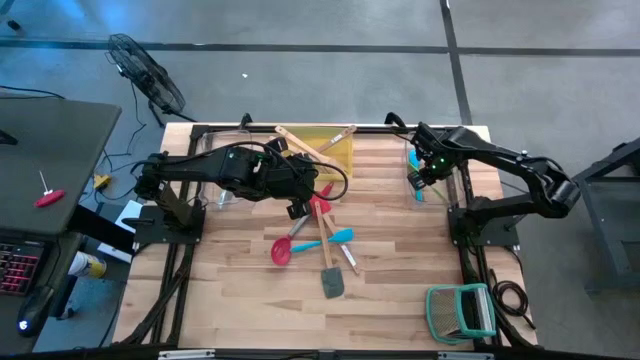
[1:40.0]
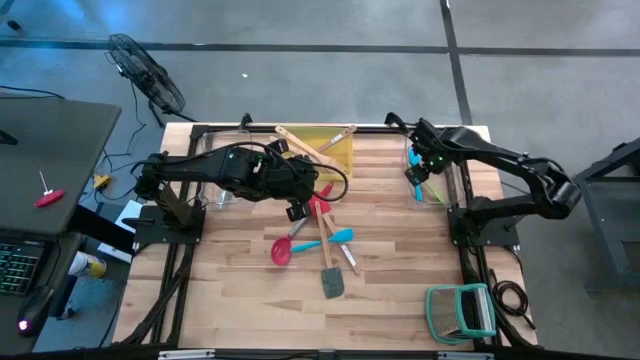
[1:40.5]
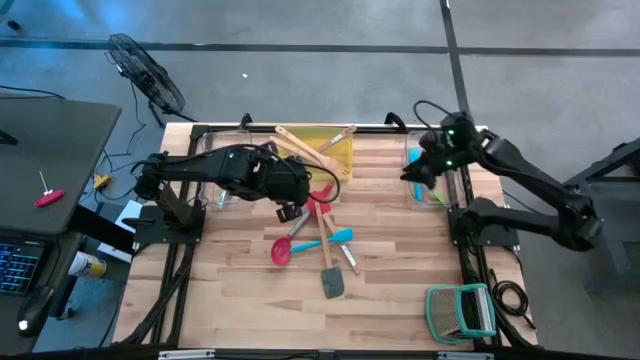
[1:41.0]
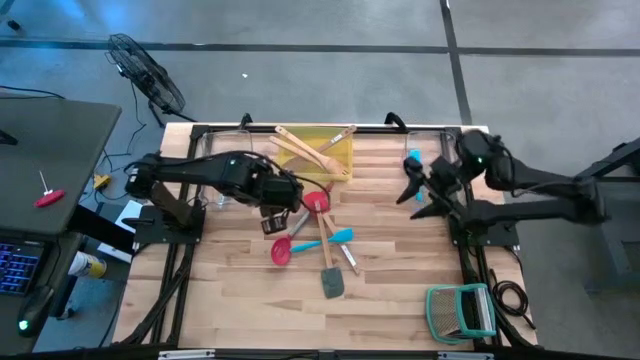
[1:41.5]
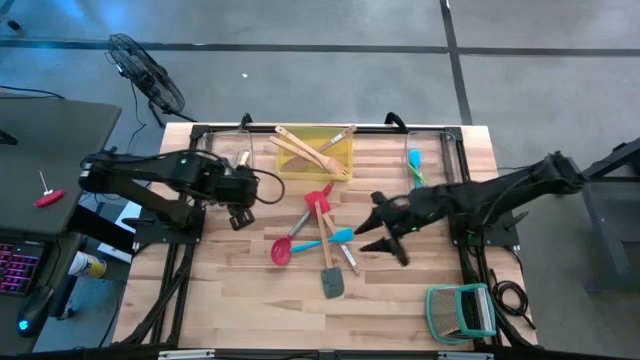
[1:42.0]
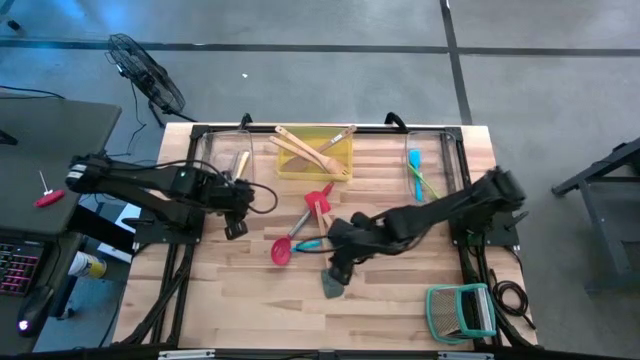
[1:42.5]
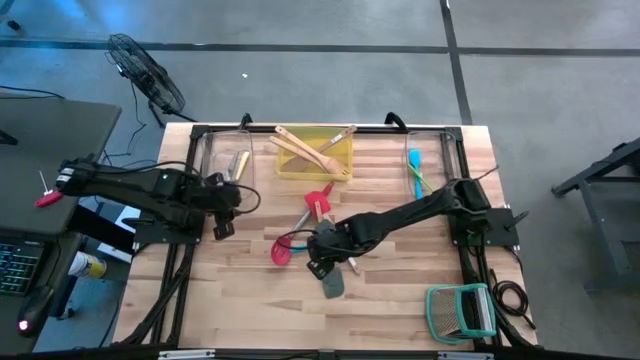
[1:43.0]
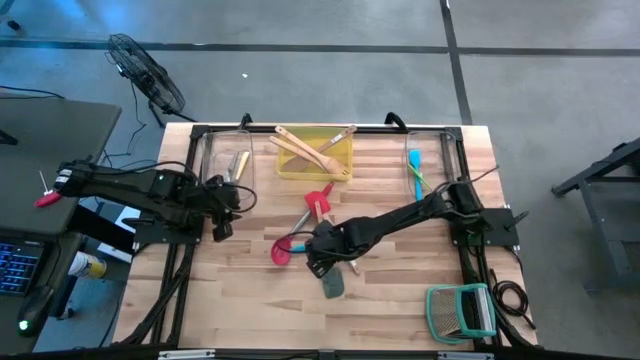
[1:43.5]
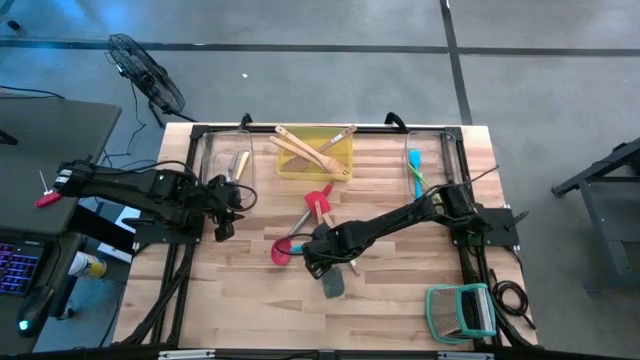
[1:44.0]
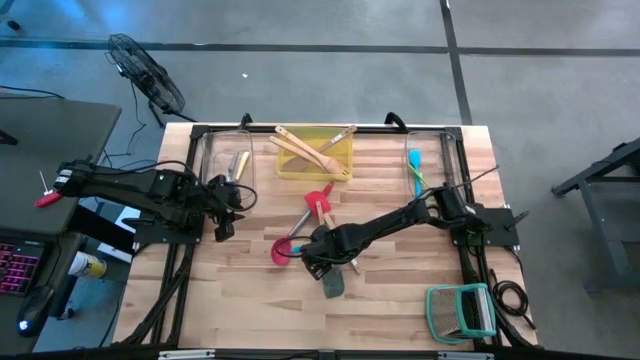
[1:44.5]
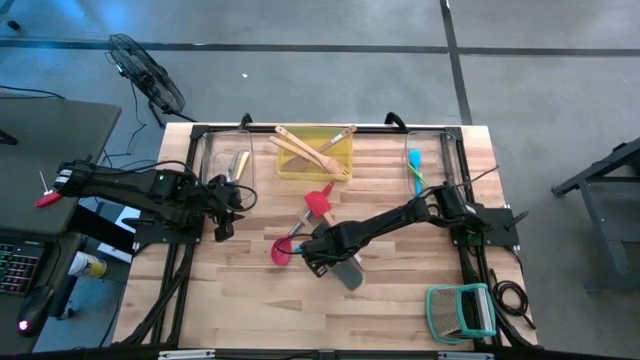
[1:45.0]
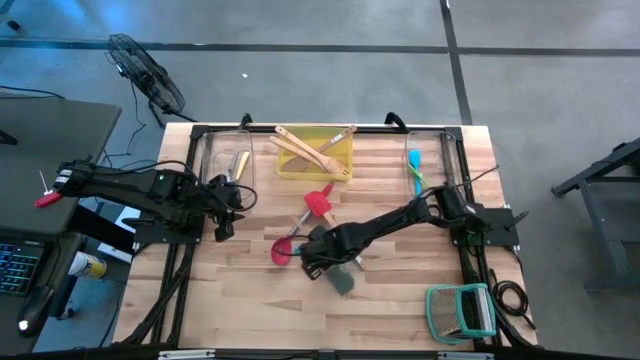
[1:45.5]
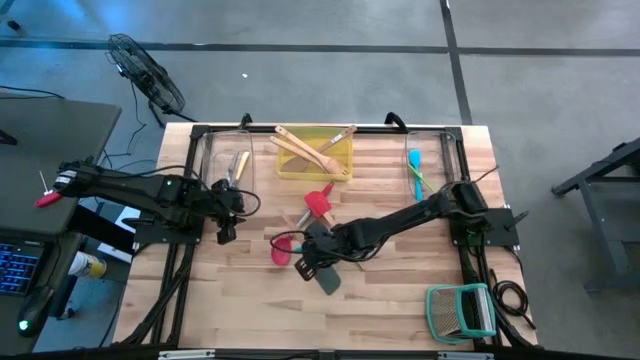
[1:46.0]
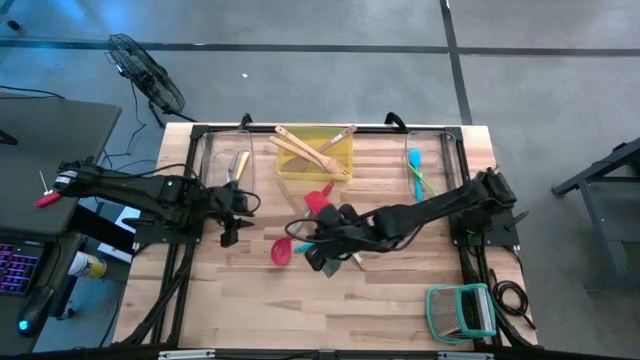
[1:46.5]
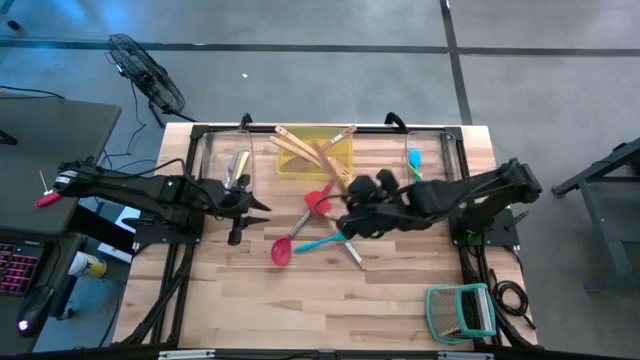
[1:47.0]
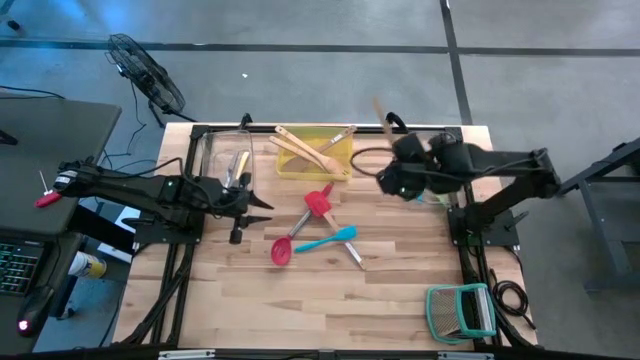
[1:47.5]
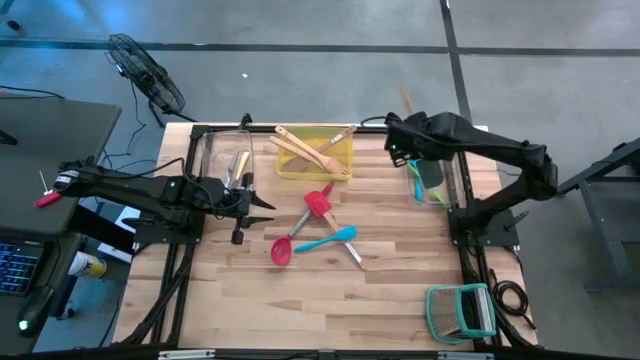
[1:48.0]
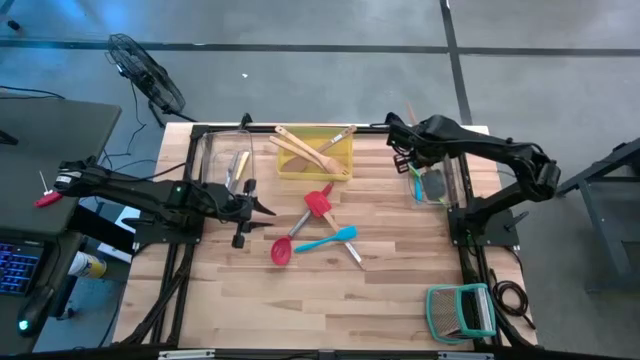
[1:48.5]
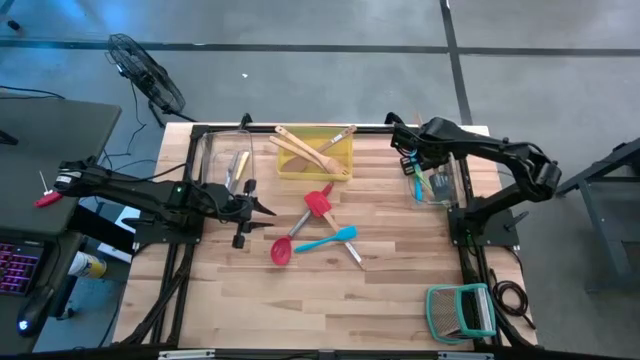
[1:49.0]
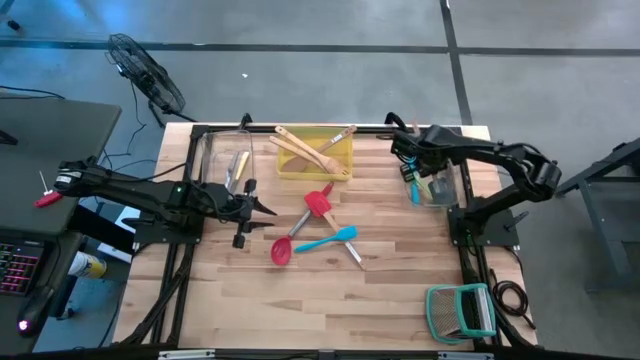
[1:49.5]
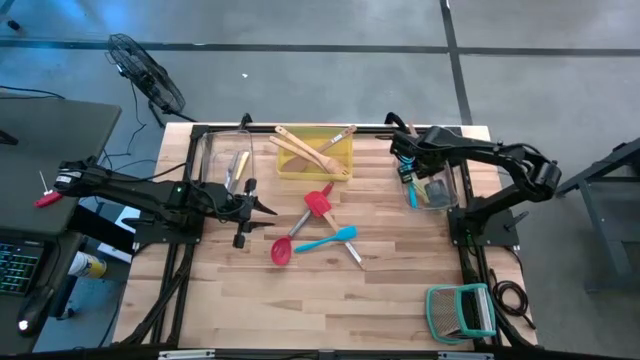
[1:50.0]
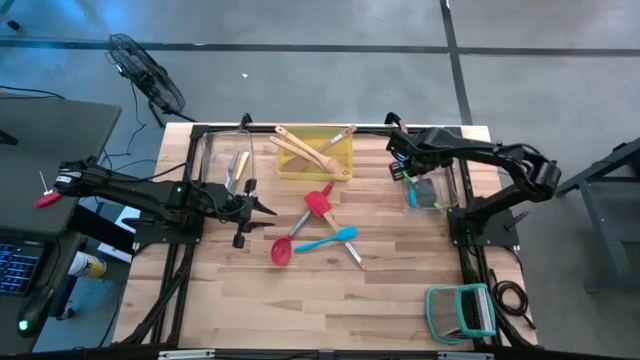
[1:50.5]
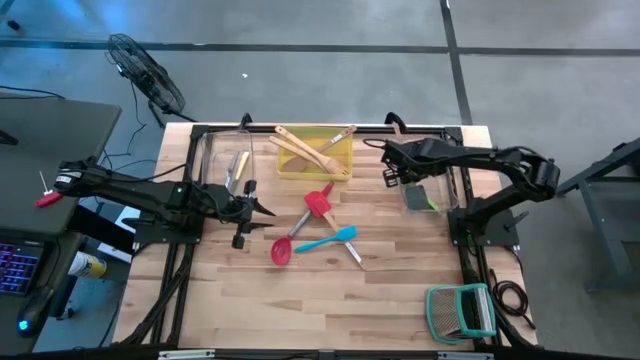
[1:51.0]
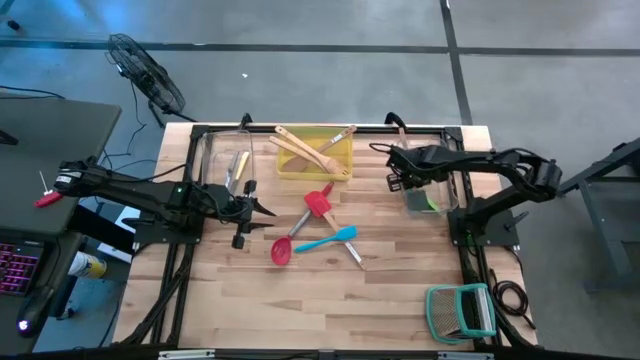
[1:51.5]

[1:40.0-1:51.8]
Task: Pick & Place Kitchen Items
Put the gray spatula into the right transparent bin

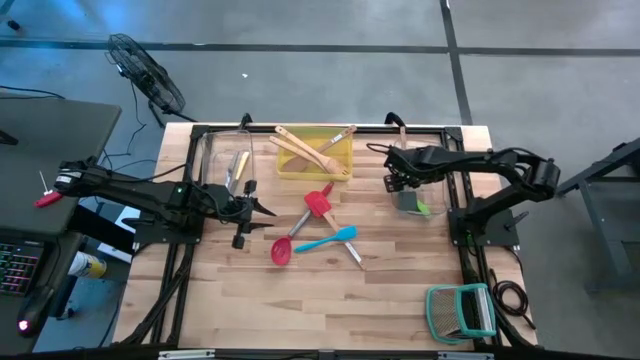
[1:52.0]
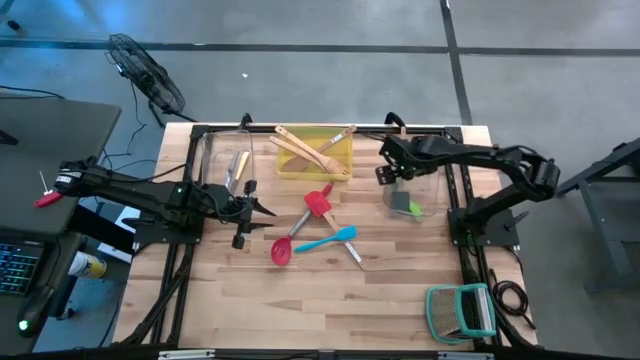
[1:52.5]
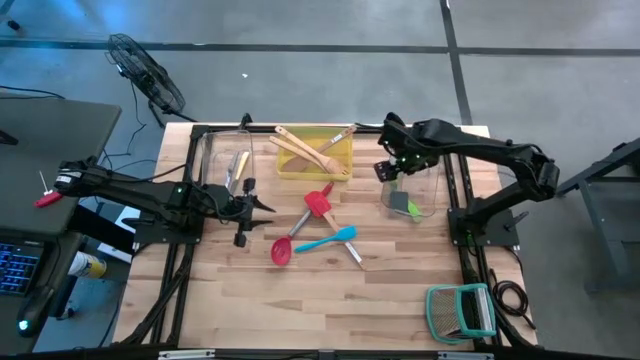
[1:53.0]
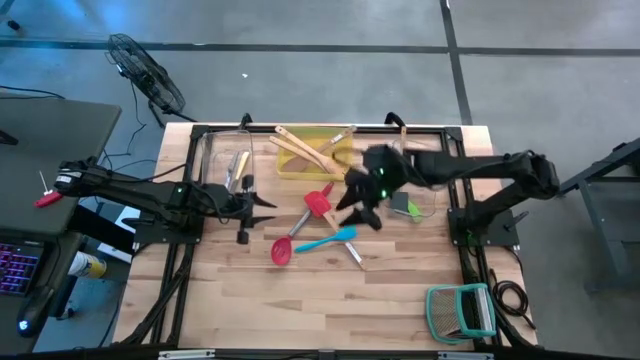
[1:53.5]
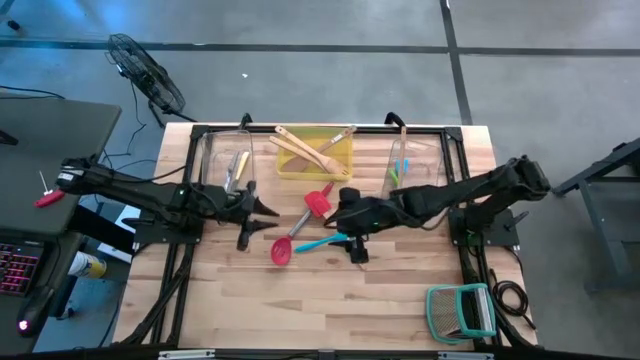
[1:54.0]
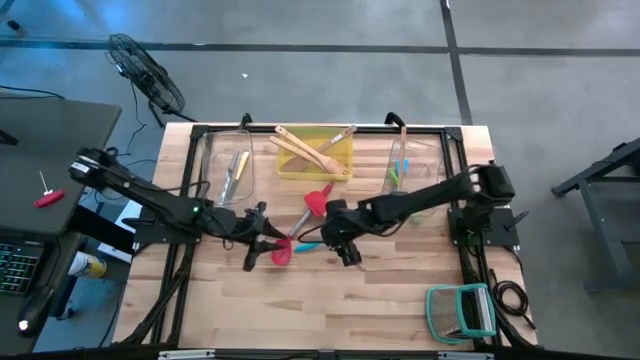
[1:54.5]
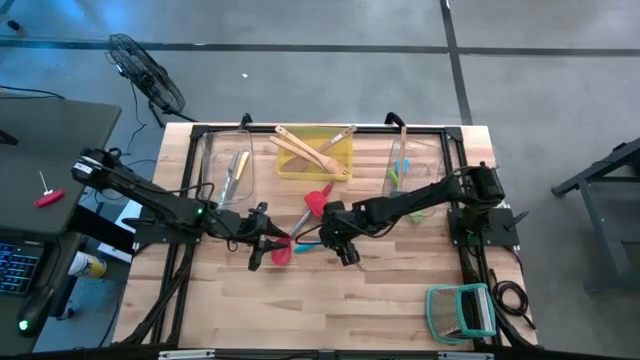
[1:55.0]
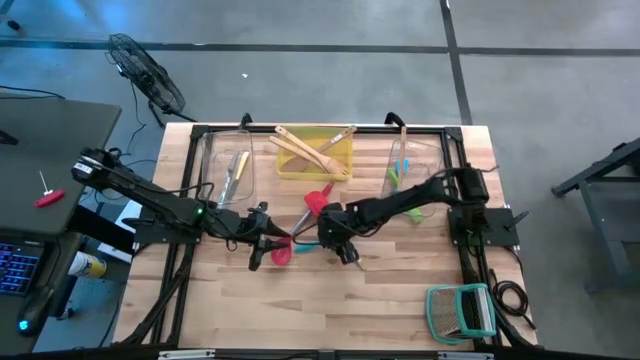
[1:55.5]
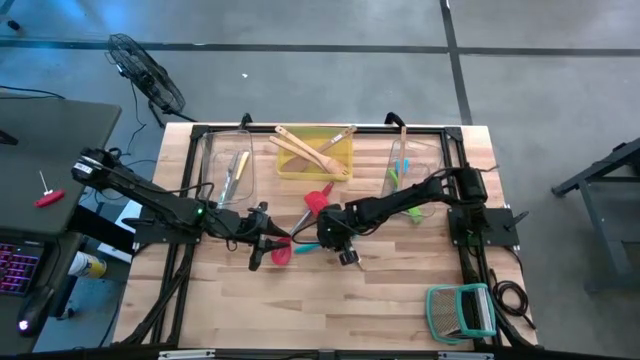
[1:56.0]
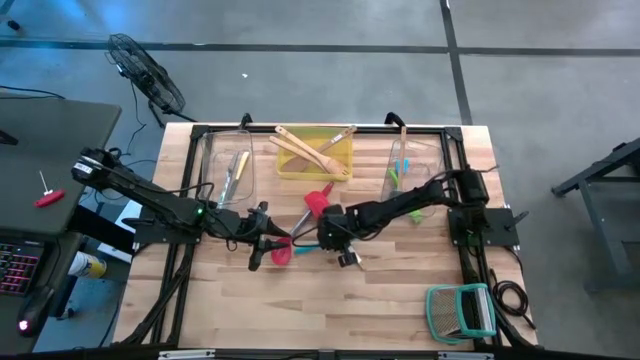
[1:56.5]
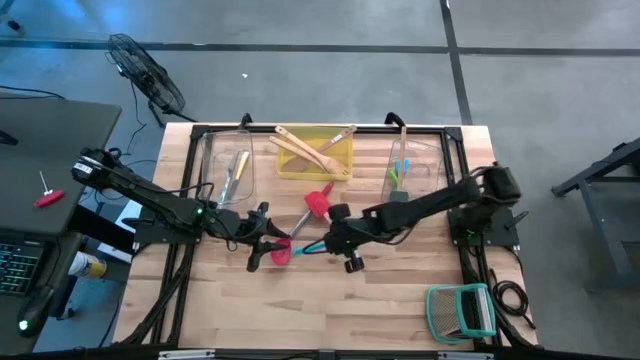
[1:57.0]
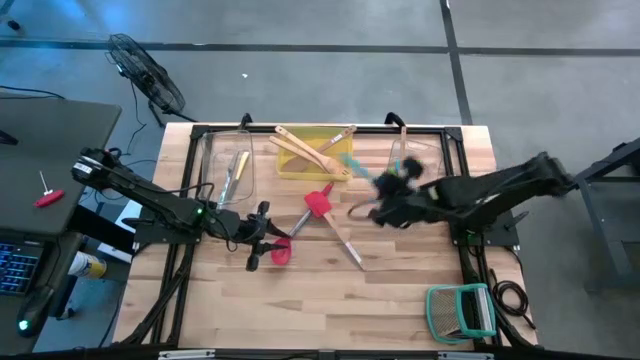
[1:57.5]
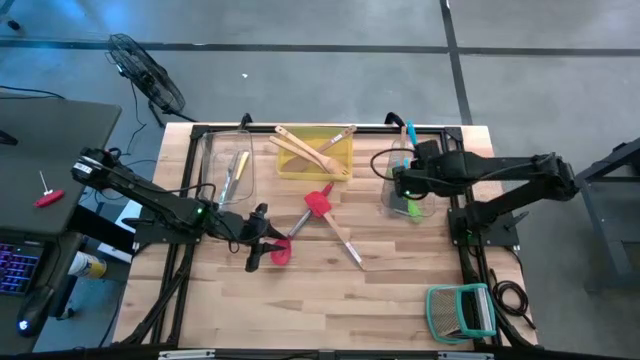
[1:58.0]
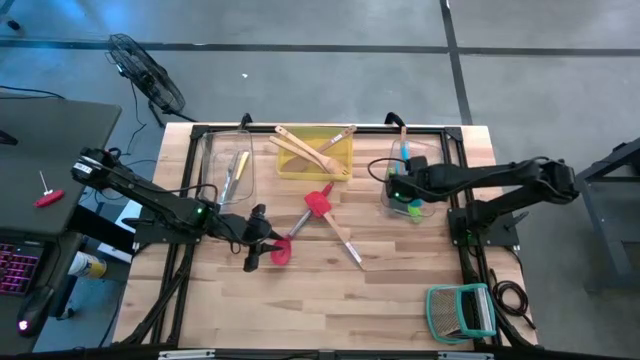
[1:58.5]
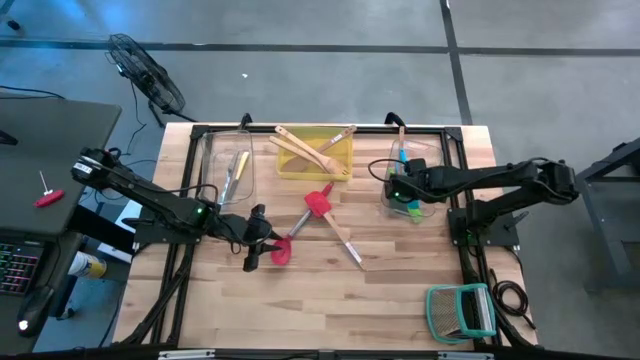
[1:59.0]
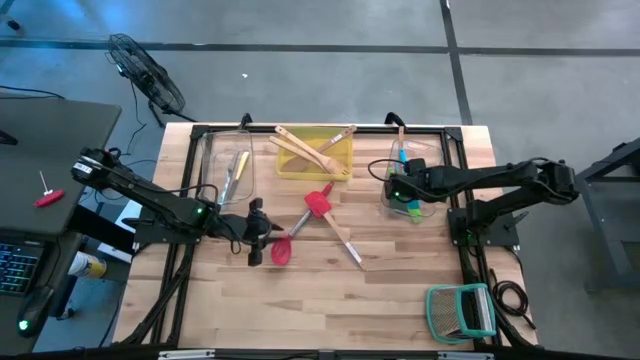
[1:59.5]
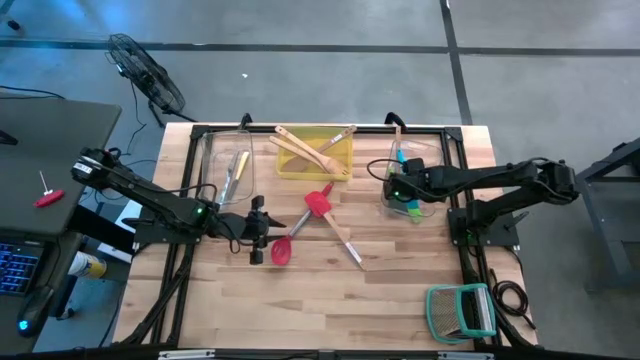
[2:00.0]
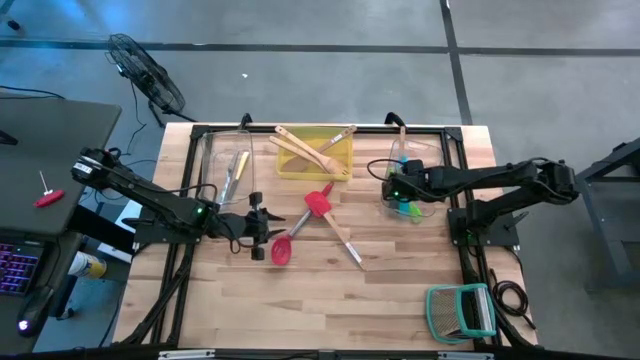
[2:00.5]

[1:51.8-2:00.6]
Put the blue spatula into the right transparent bin

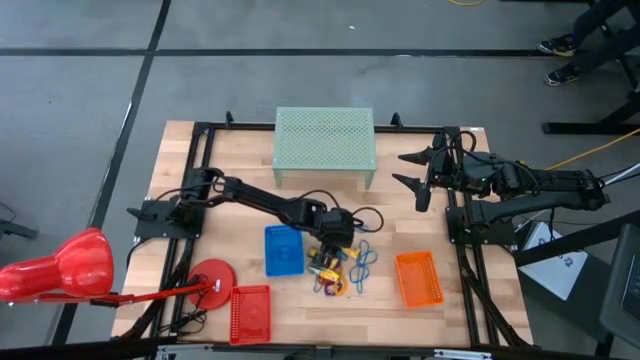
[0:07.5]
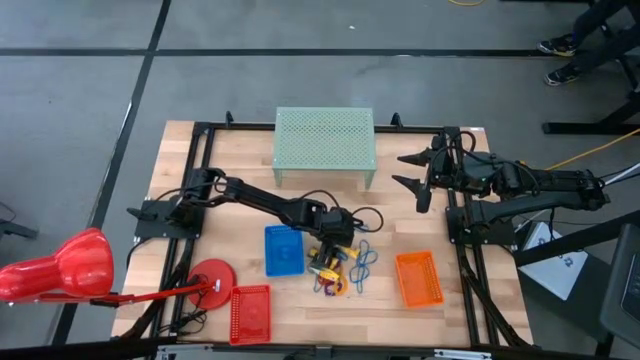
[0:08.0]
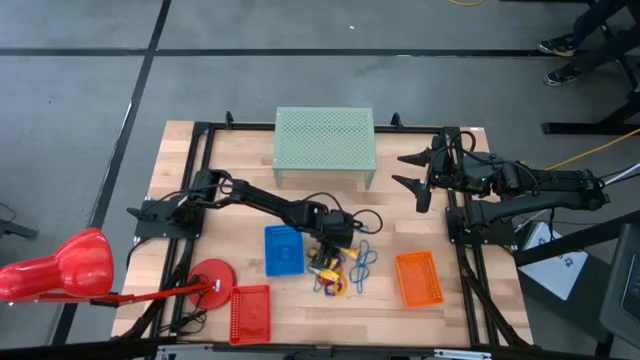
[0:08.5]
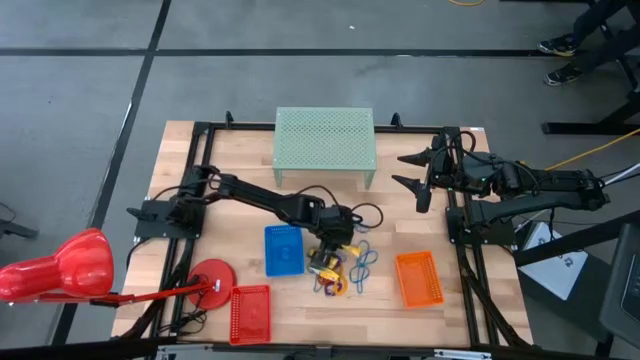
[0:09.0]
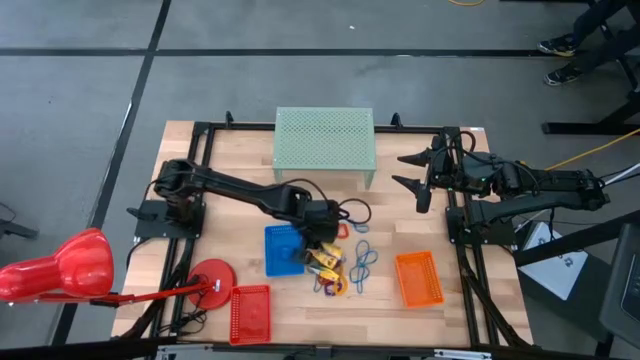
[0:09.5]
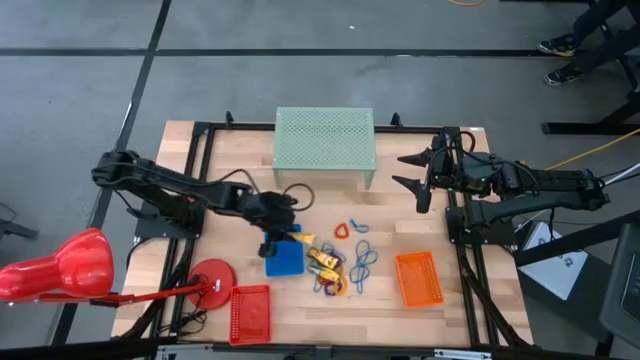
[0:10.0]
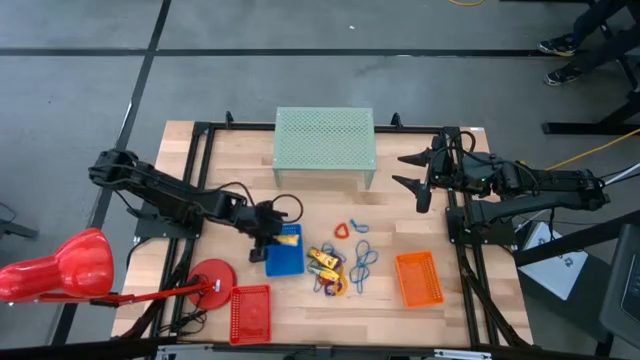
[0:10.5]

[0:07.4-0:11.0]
Task: Pick & Place Office Desk Supplies
Put the top yellow box of crayons into the blue bin
